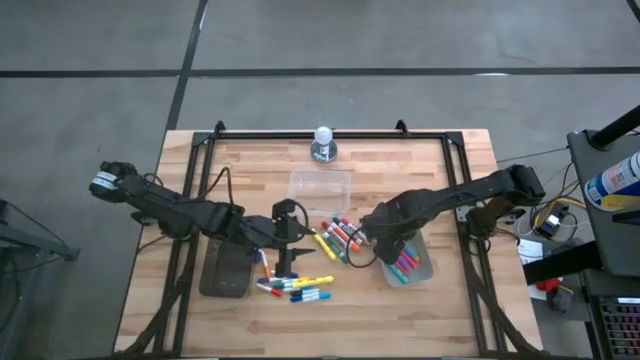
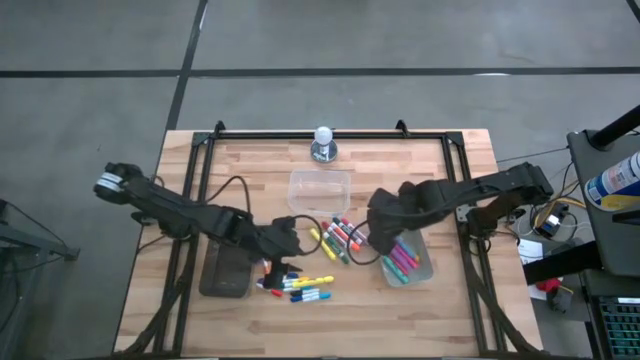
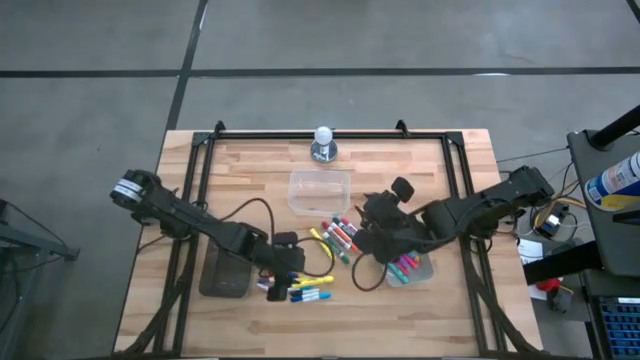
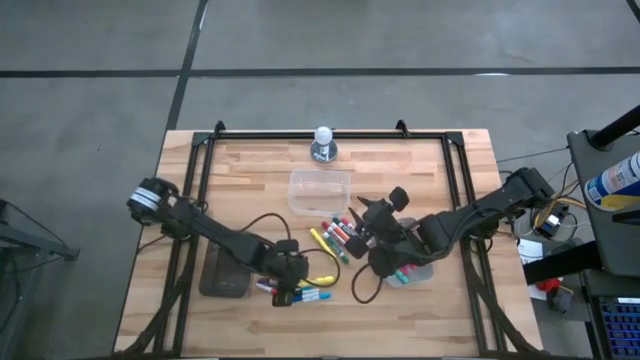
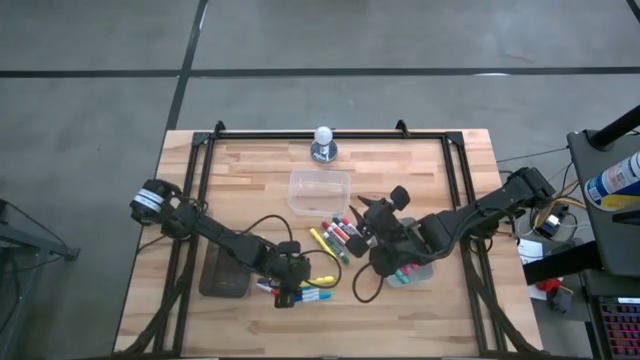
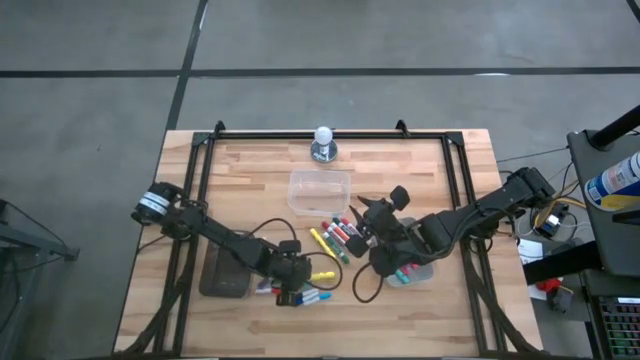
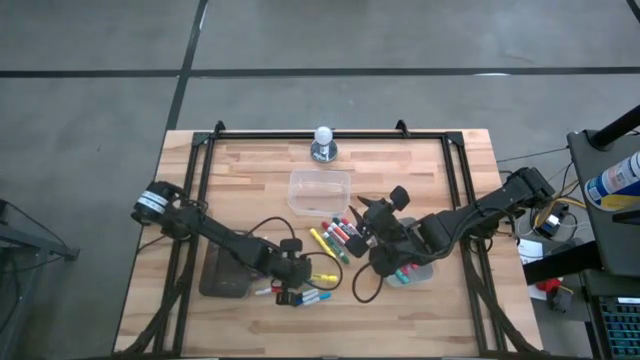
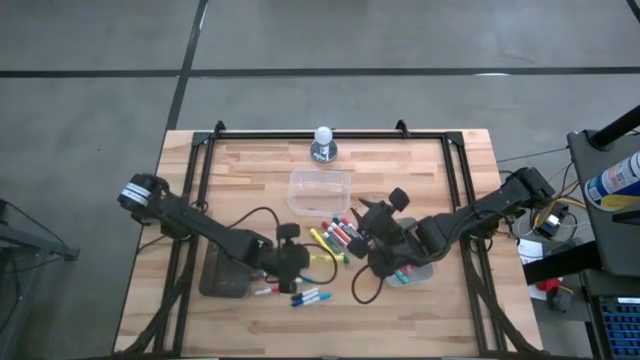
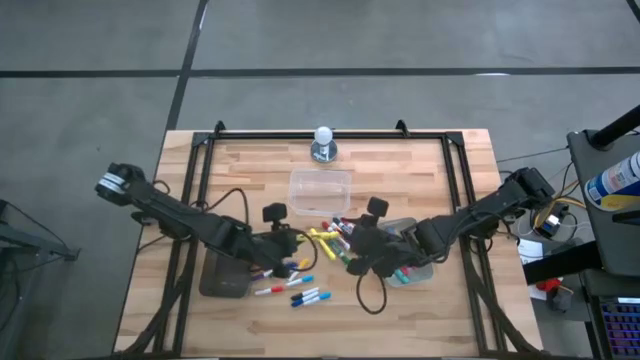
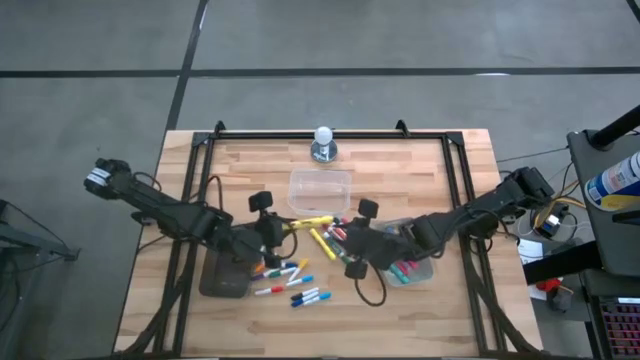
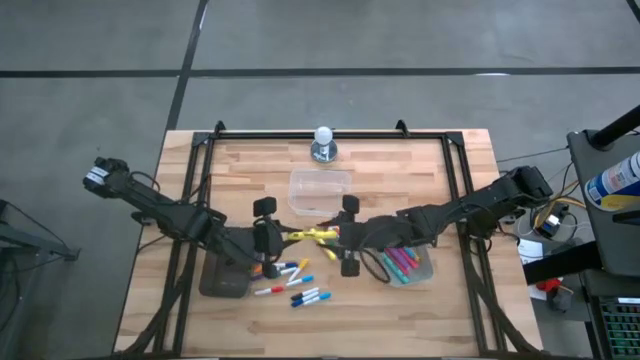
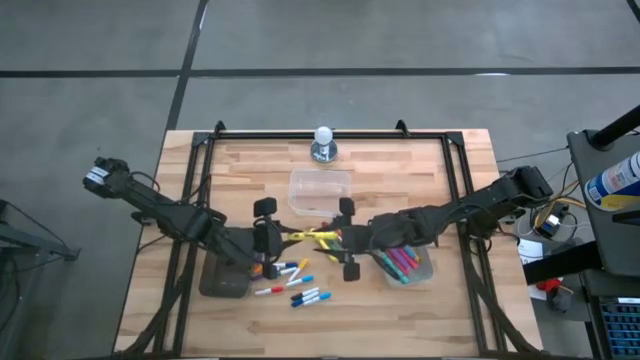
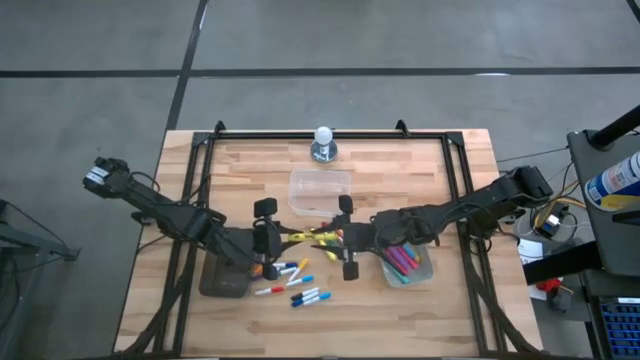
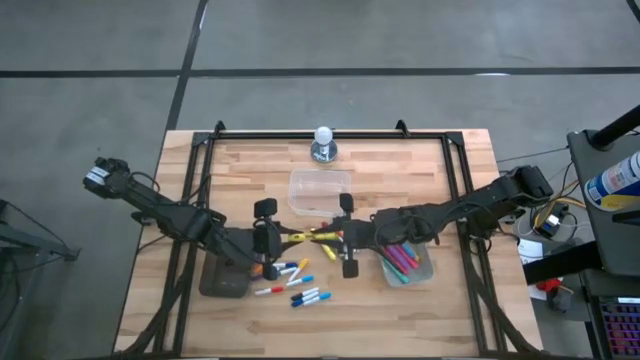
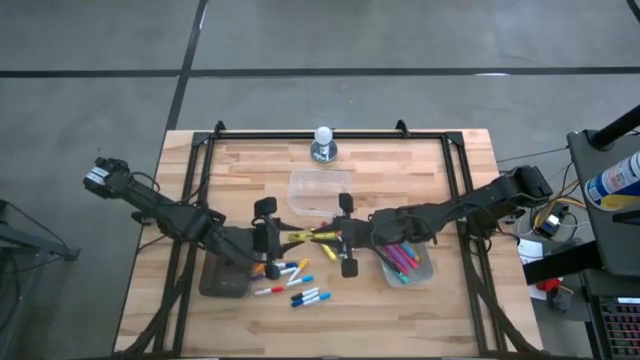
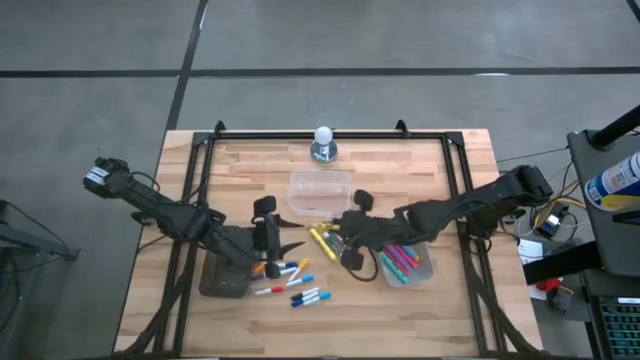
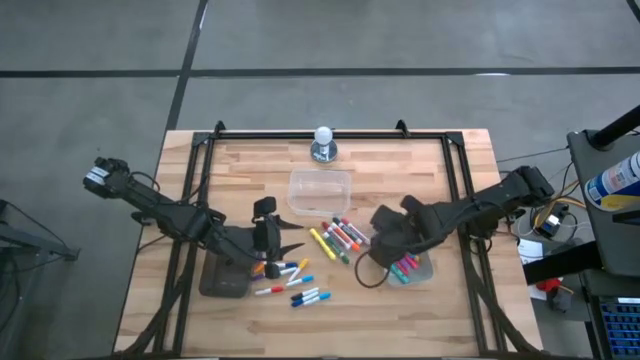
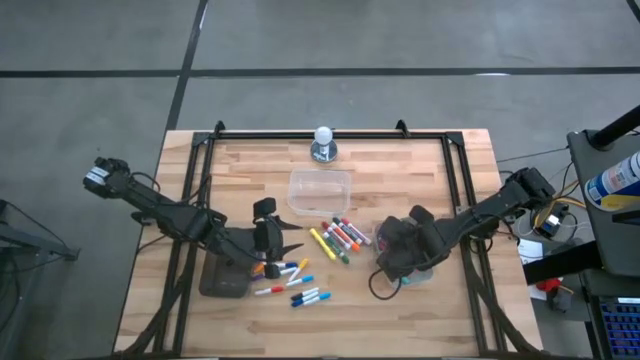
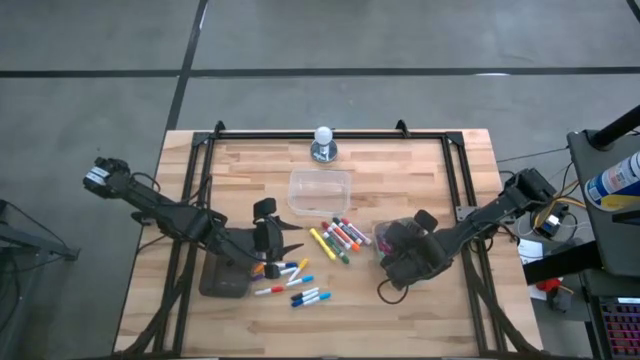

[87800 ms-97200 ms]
Task: Pick & Place Markers
Put the bottom yellow highlighter into the gray bin

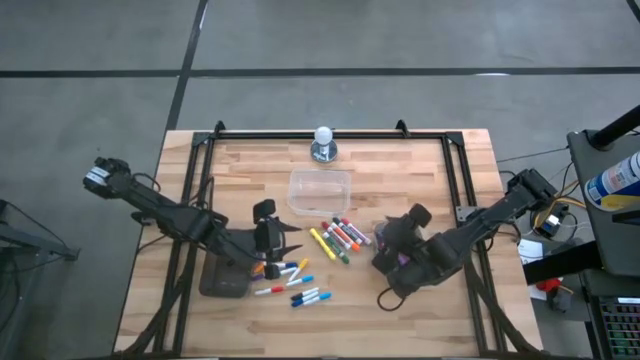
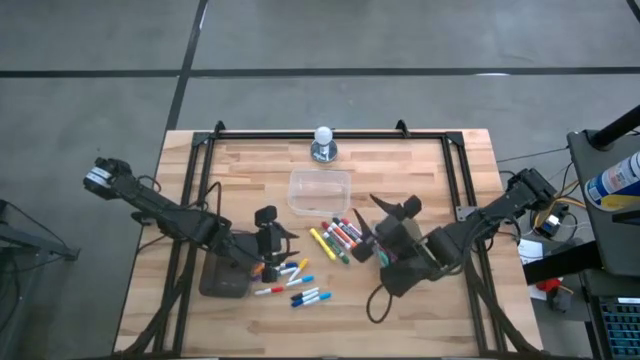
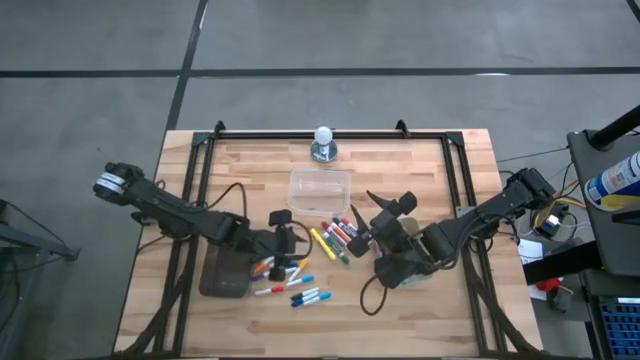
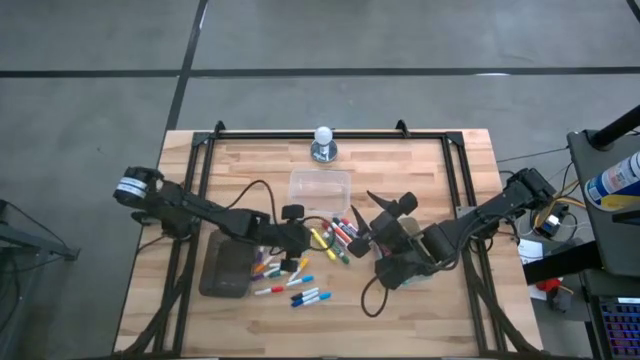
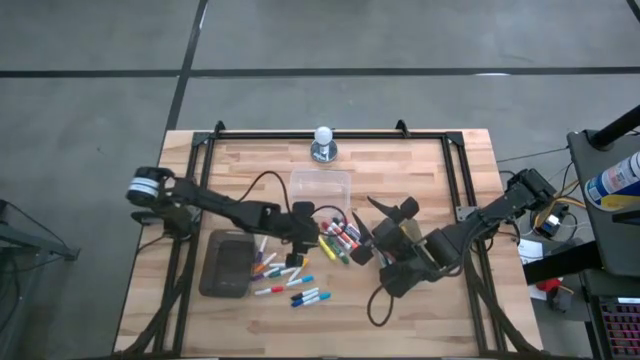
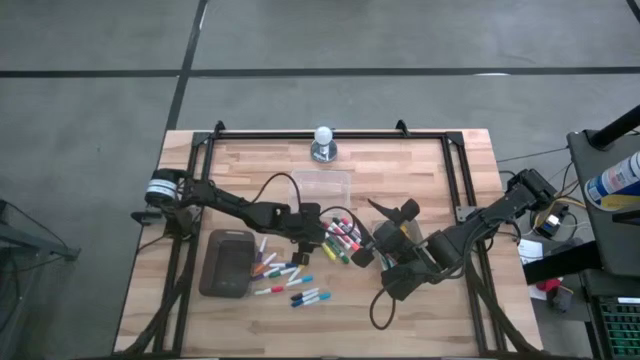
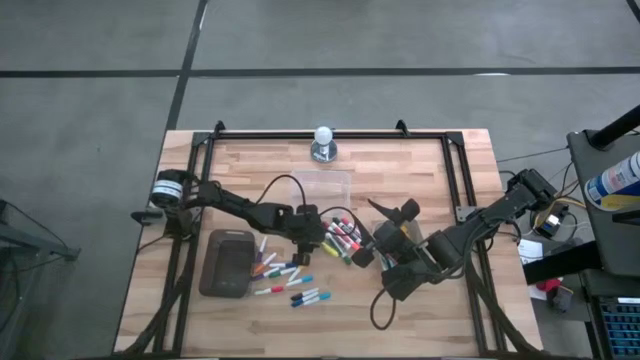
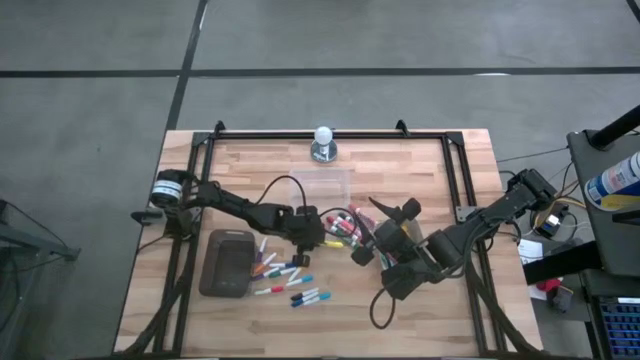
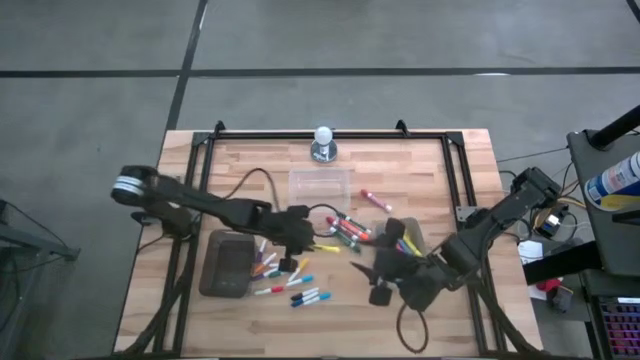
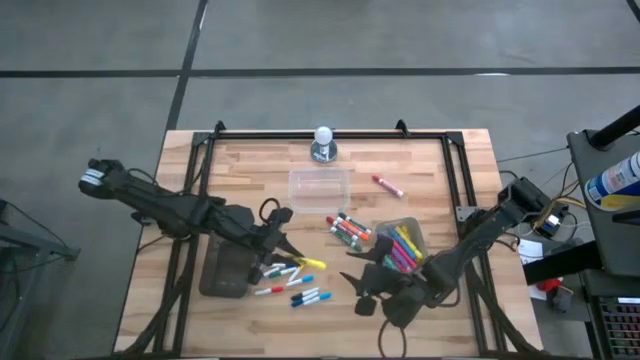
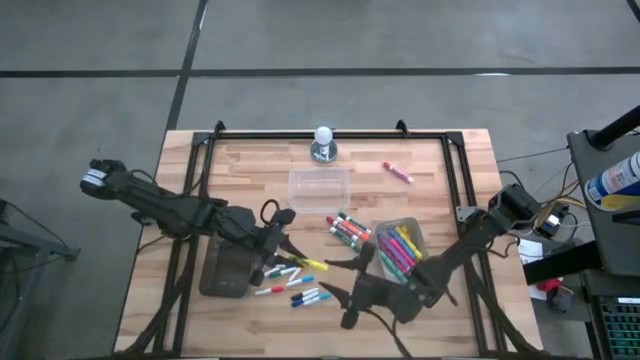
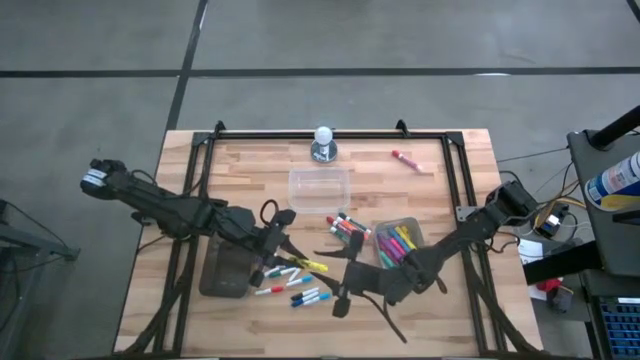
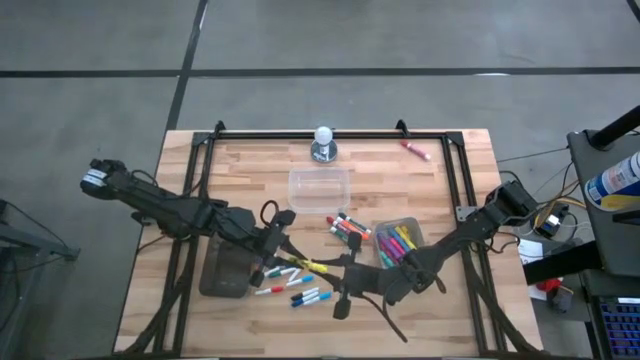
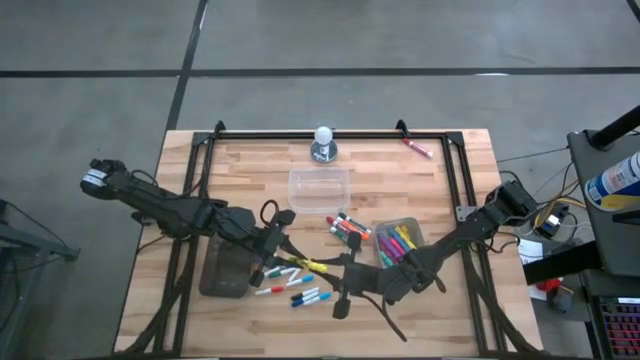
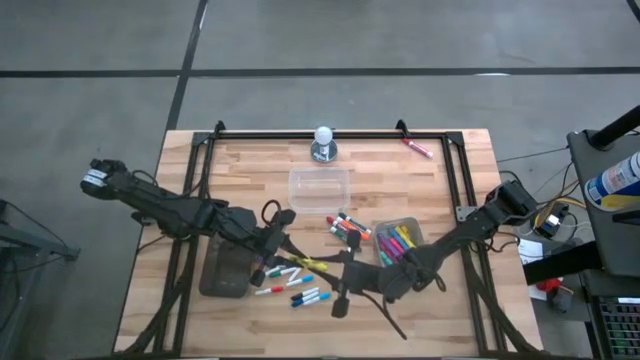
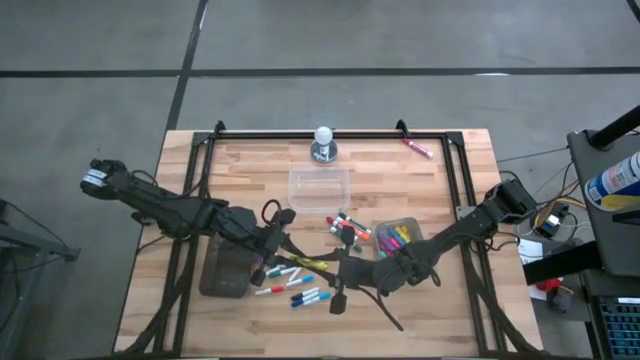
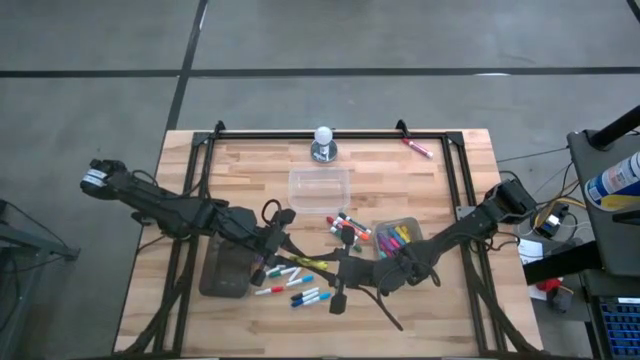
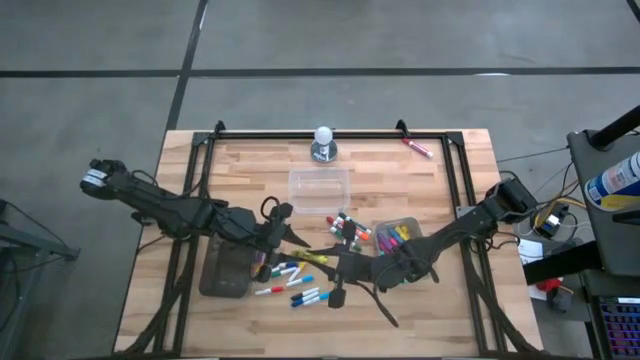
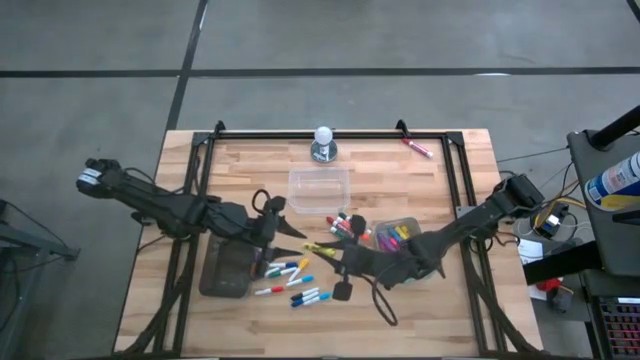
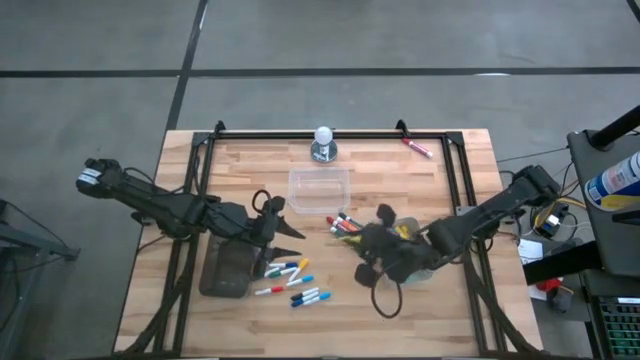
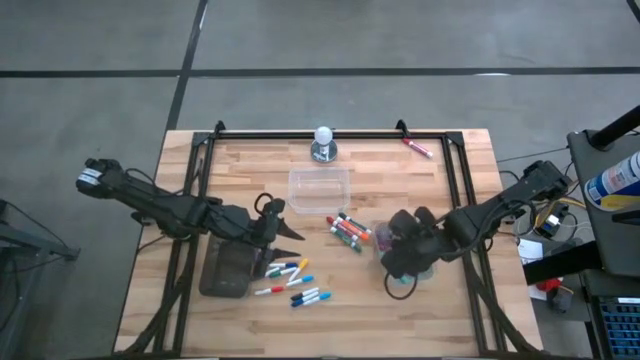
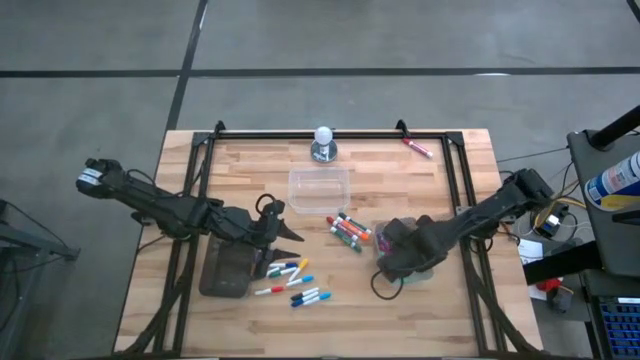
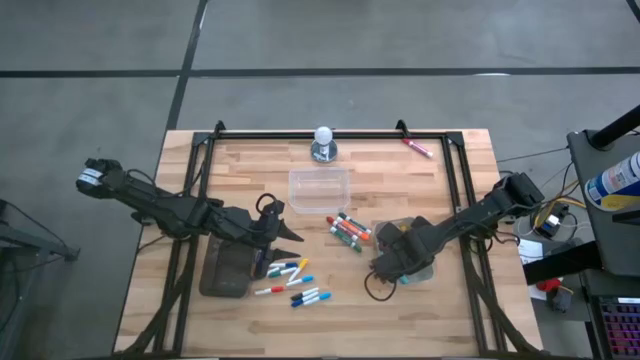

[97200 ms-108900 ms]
Put the yellow highlighter into the gray bin

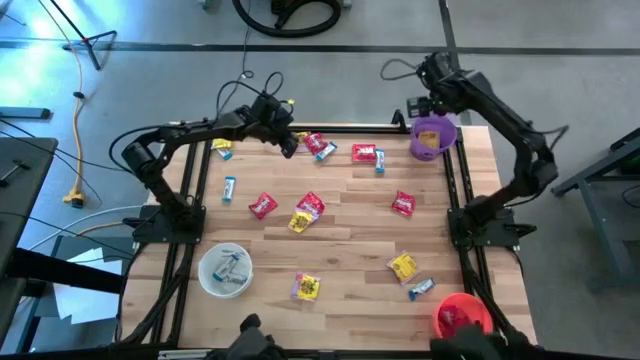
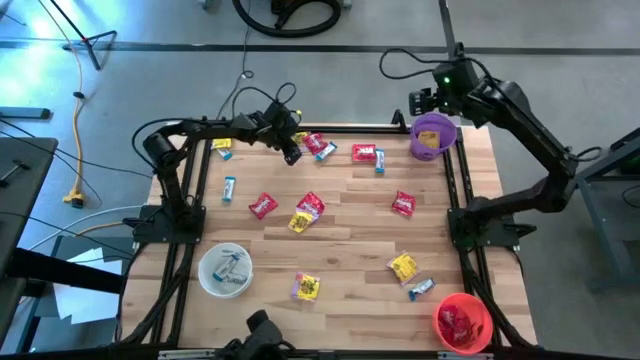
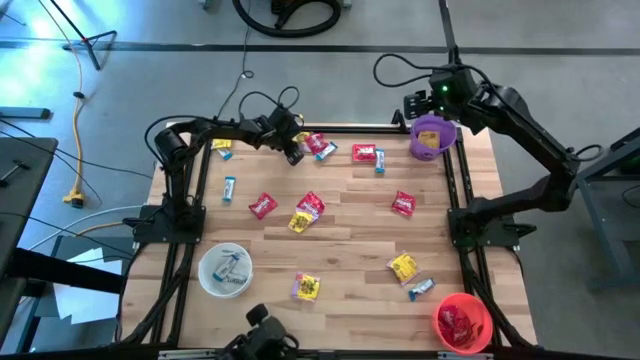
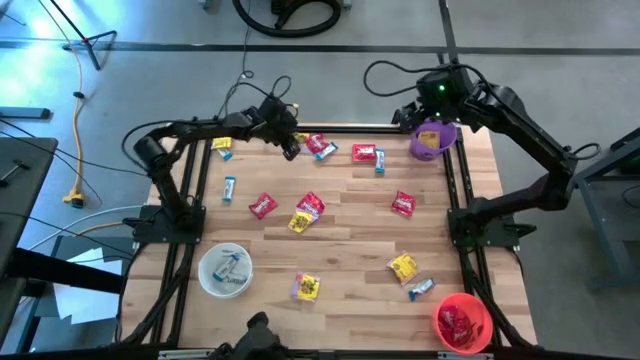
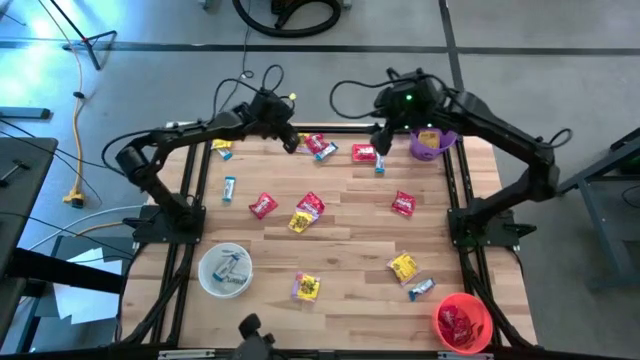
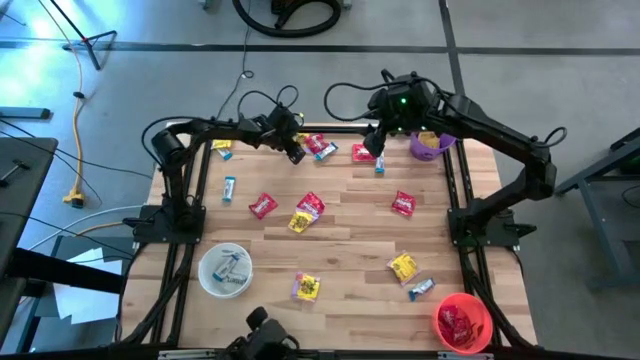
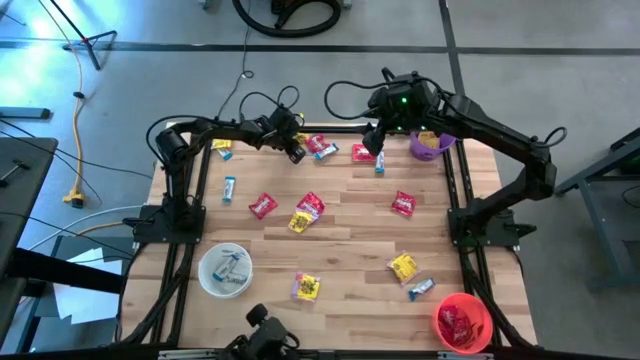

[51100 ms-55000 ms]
Task: Sort candy
Put the yellow candy into the purple bin
